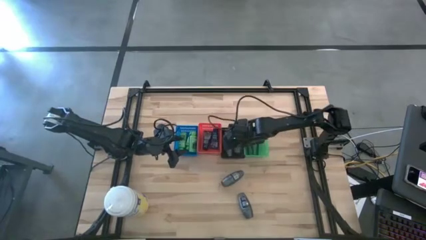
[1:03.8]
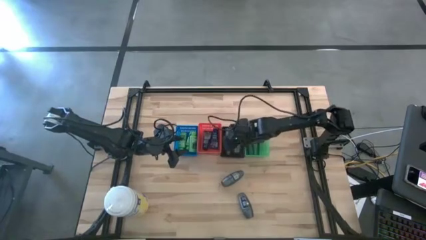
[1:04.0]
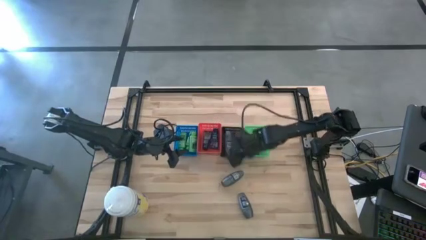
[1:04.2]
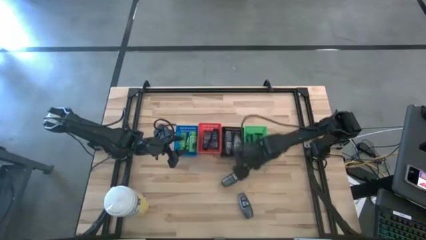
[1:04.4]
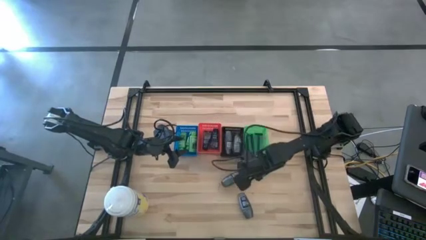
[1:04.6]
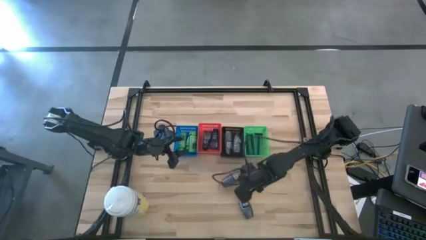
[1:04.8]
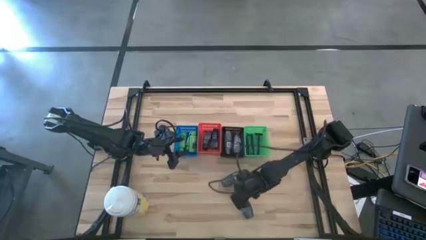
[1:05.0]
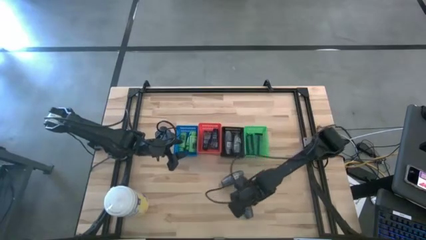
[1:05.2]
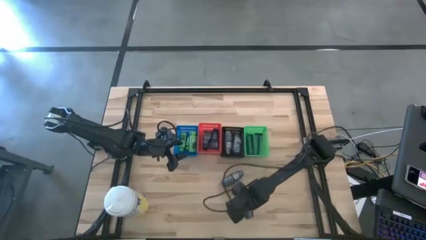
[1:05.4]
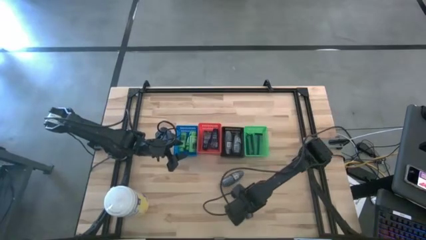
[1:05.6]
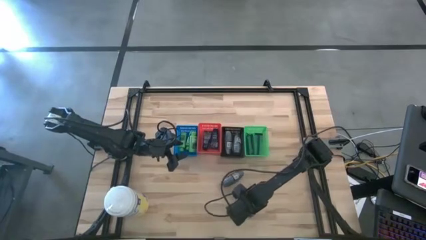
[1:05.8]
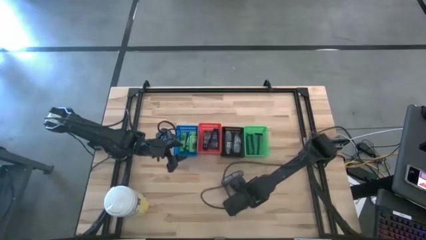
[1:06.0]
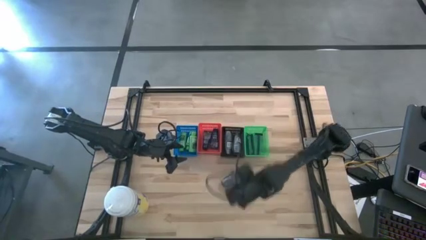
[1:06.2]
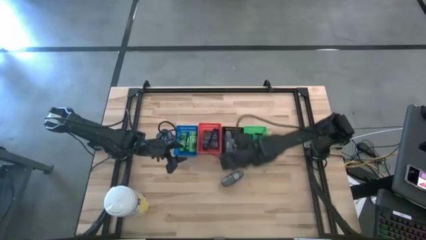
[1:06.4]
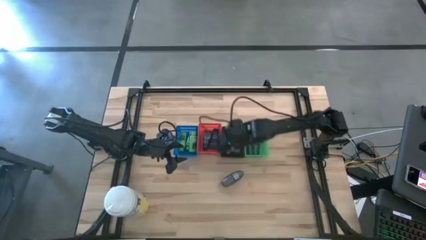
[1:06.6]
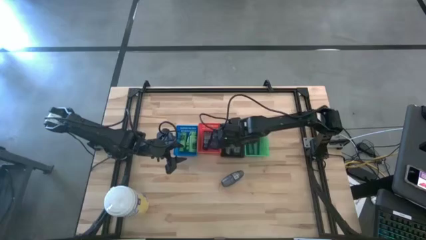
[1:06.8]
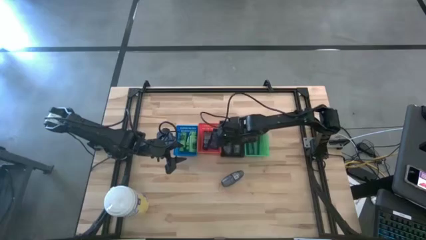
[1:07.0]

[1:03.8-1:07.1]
Task: Pick & Place Travel size toiletries
Put the deodorant into the black basket

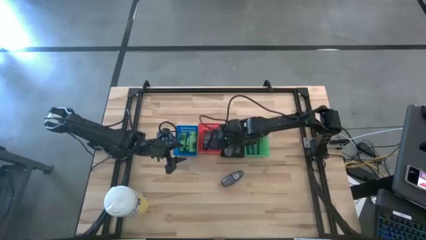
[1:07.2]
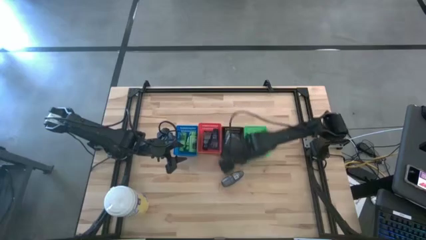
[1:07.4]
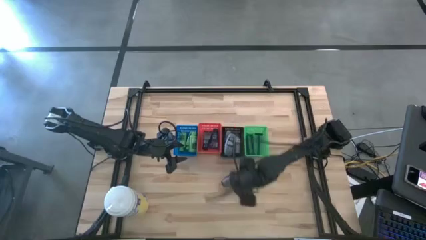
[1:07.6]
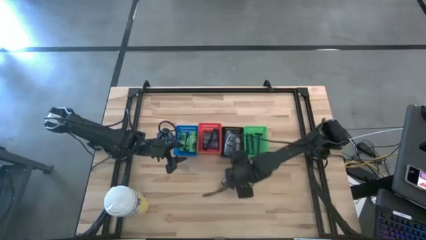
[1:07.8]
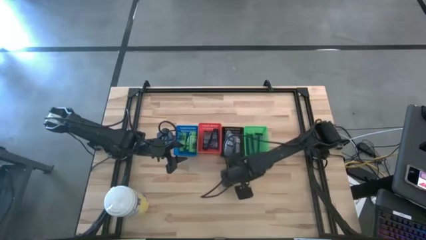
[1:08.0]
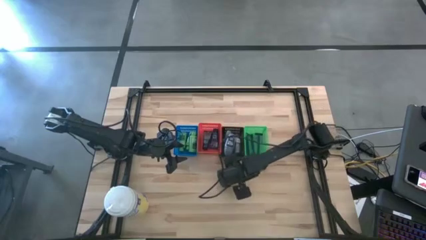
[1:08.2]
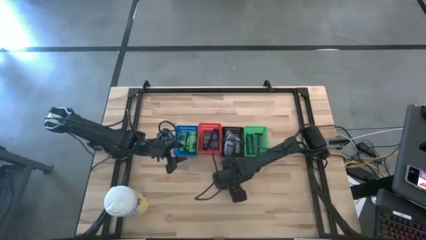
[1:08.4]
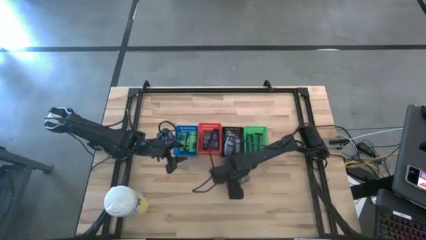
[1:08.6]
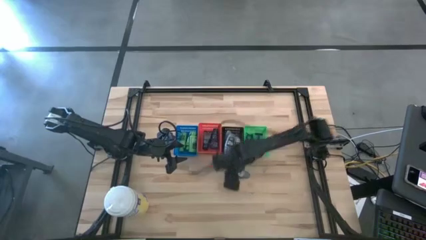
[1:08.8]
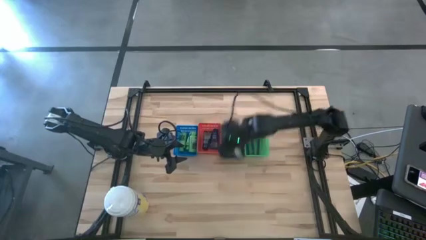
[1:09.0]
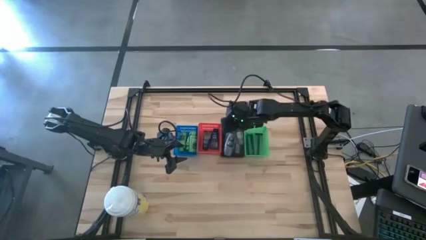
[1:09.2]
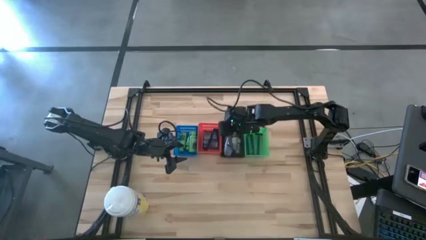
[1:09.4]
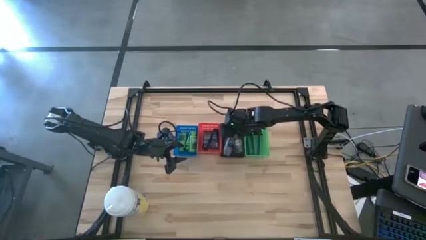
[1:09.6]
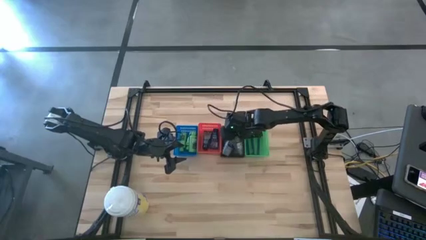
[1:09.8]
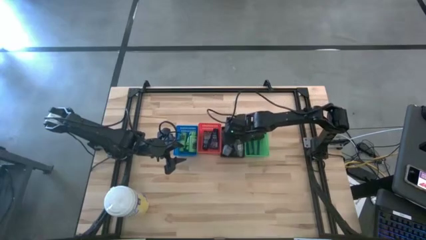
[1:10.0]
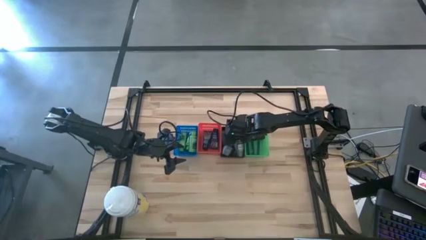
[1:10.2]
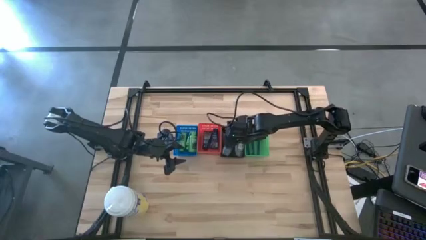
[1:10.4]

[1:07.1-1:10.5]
Put the deodorant into the black basket

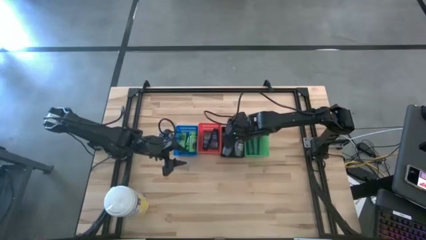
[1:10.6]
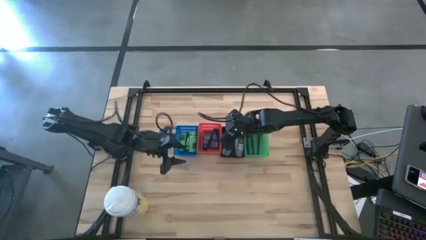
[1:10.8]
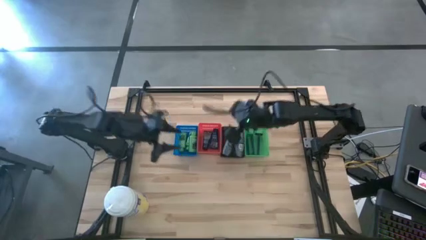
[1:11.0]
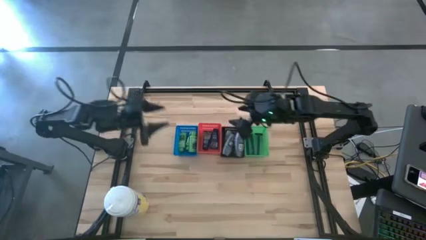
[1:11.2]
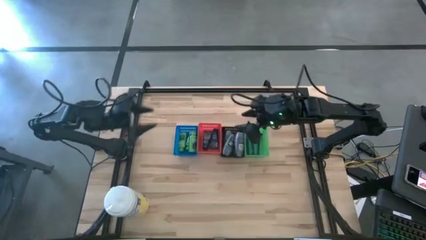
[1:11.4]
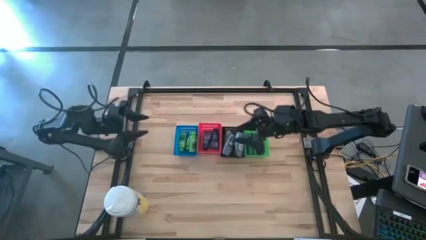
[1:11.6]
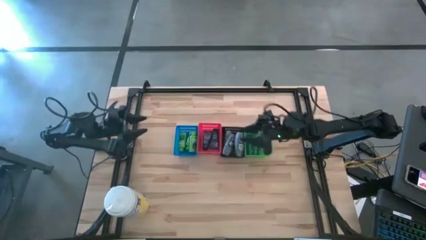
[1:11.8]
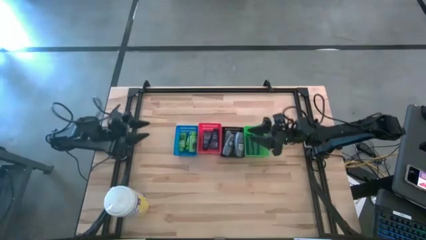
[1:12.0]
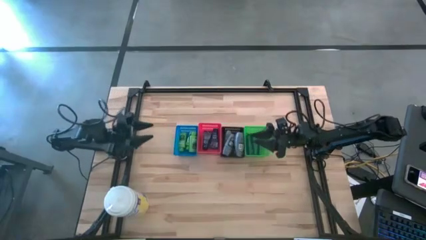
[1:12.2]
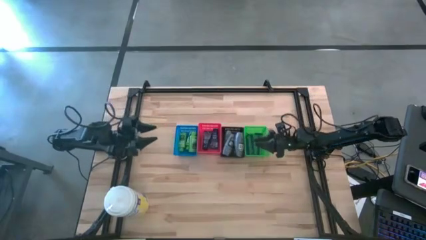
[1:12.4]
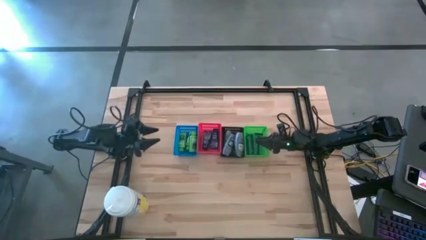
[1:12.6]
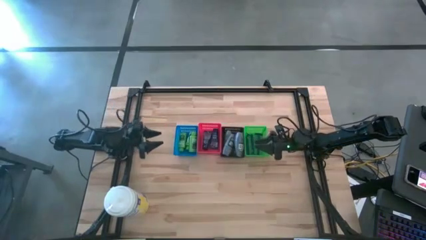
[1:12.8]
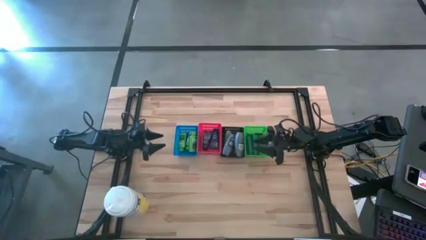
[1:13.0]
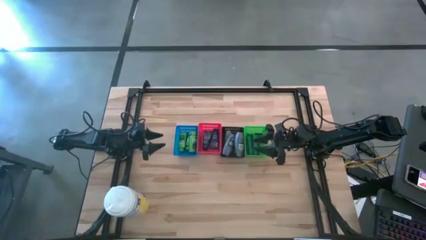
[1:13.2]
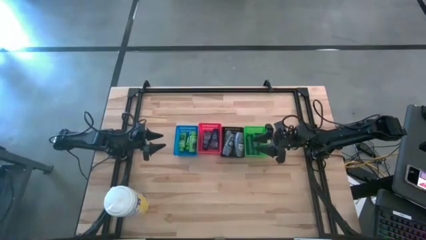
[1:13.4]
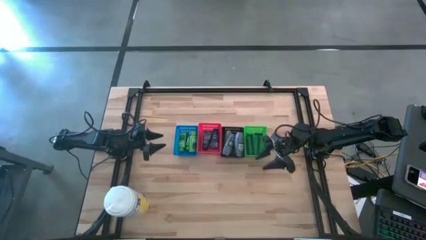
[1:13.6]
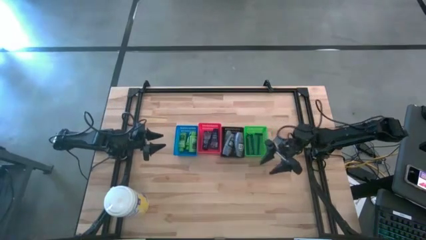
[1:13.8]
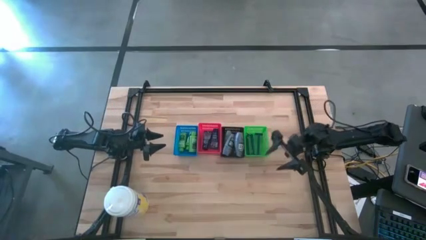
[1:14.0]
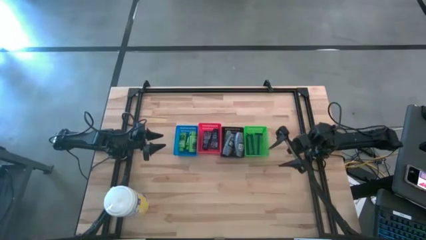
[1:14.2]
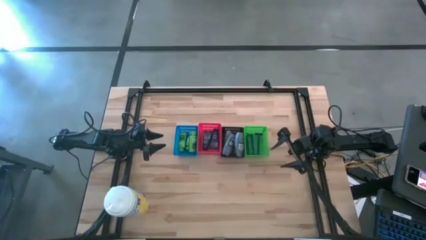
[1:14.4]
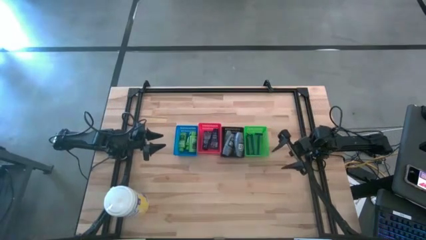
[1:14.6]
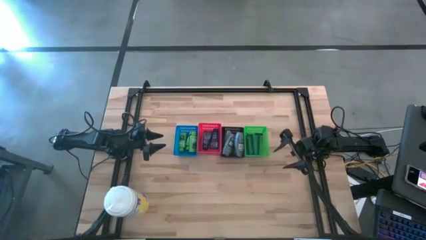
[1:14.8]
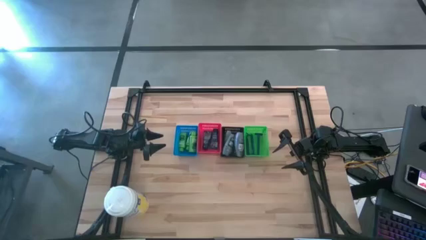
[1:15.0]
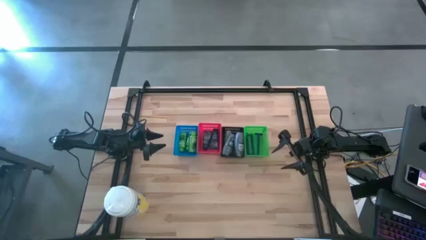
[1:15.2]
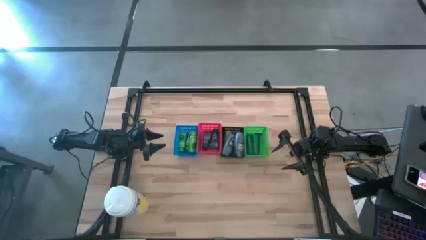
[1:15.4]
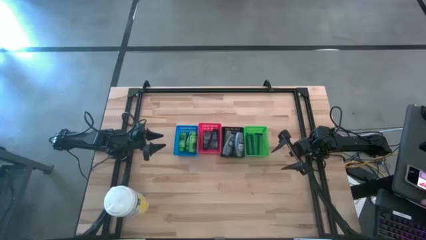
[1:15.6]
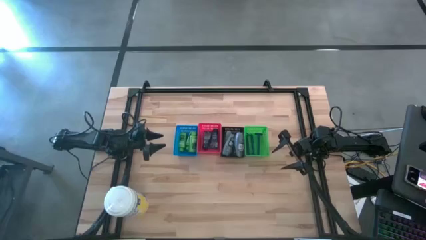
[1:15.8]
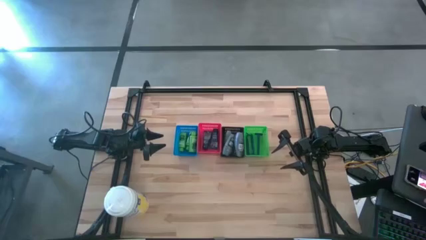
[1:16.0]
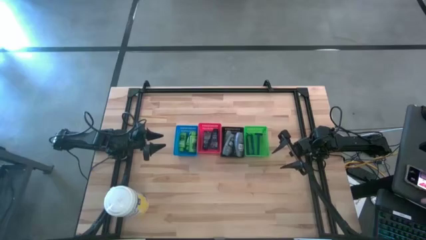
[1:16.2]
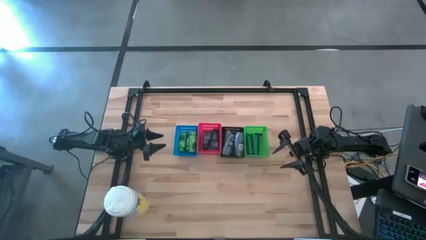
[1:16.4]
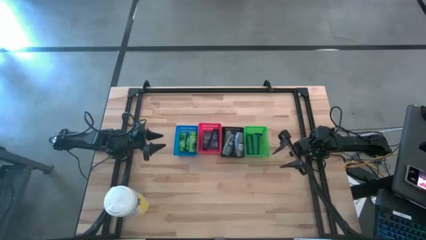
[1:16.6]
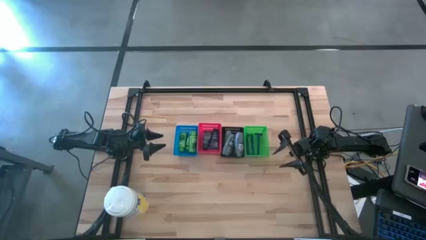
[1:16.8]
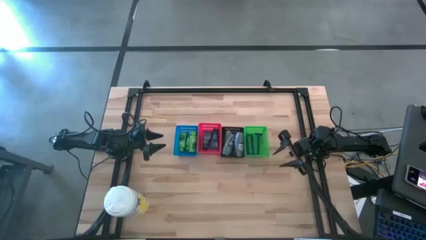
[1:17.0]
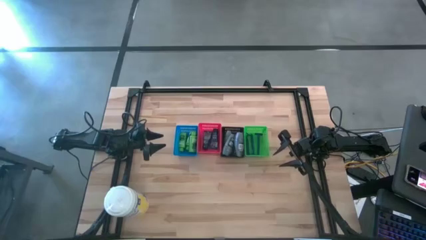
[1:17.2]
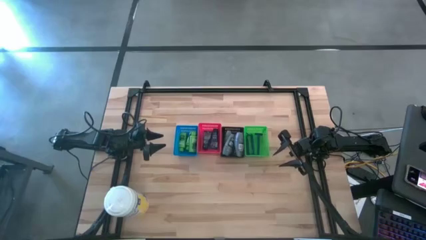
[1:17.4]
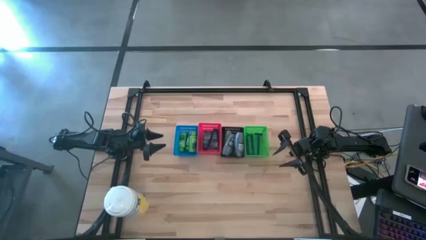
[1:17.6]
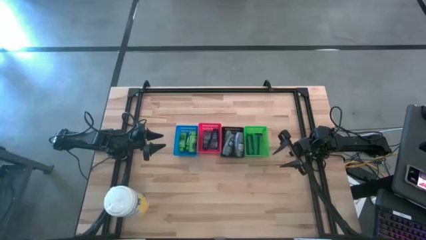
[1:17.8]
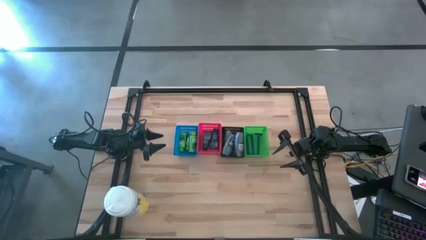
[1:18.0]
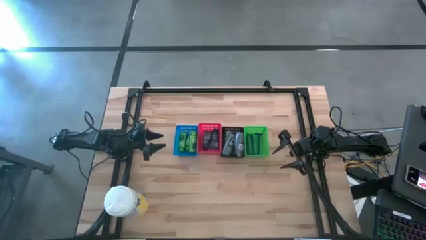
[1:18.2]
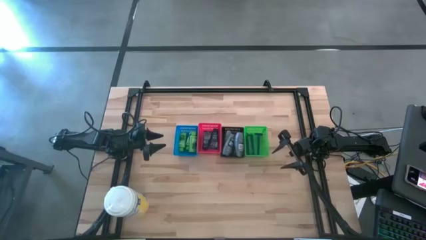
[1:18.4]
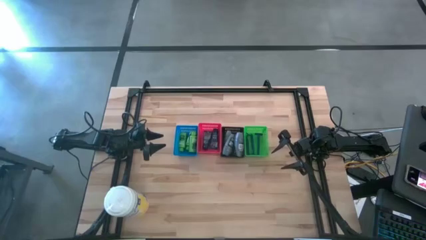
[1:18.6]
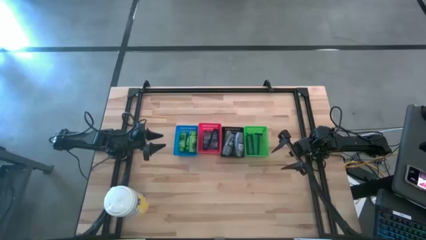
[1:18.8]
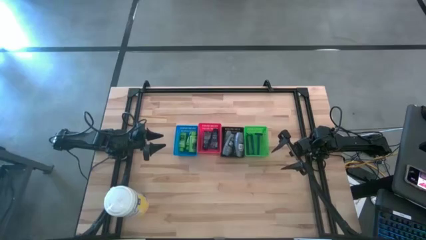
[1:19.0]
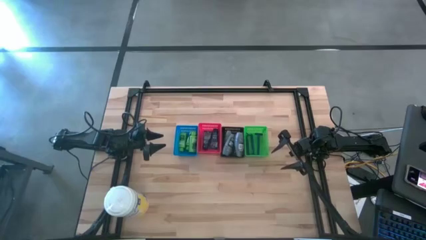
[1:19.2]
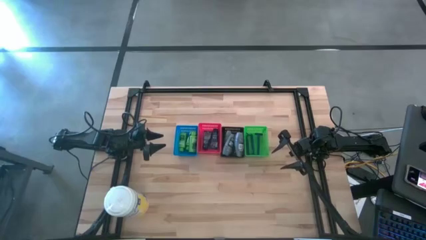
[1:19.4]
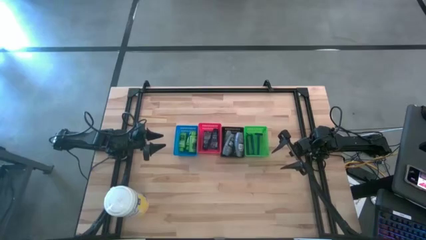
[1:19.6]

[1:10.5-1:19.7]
Return to Home Position

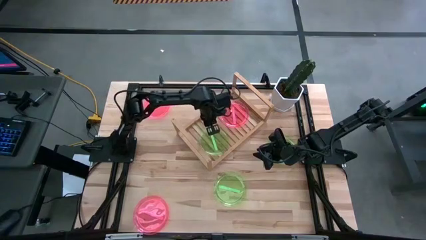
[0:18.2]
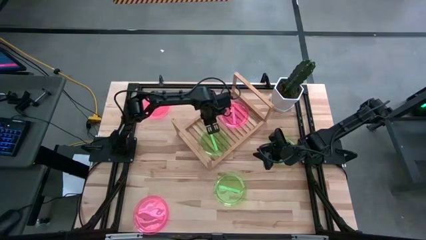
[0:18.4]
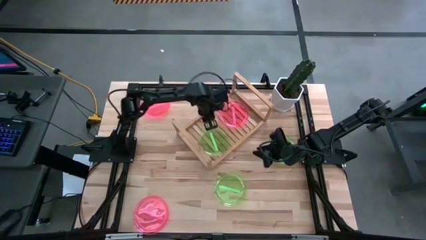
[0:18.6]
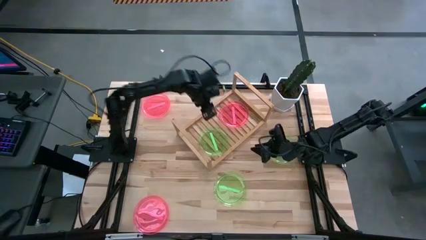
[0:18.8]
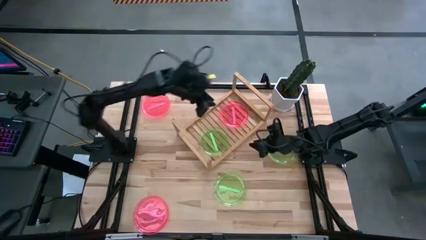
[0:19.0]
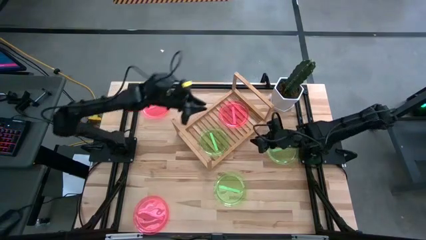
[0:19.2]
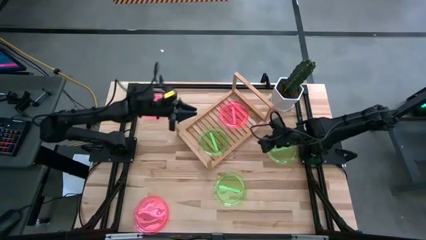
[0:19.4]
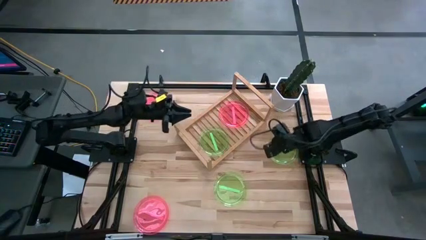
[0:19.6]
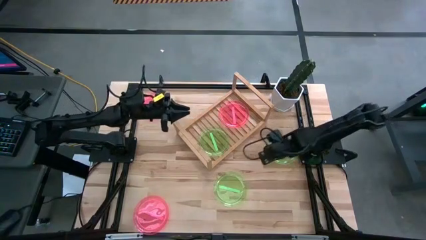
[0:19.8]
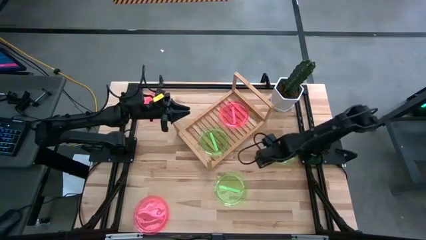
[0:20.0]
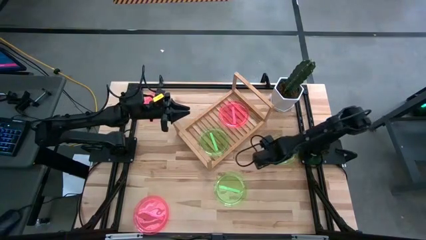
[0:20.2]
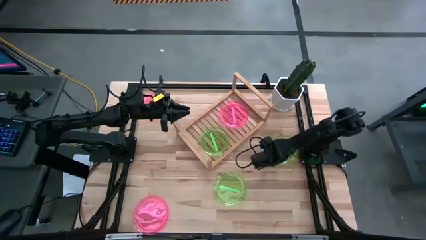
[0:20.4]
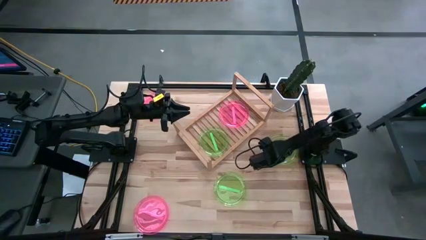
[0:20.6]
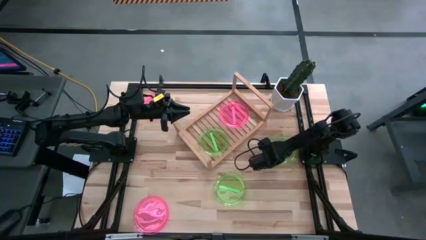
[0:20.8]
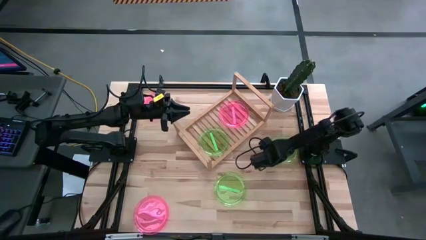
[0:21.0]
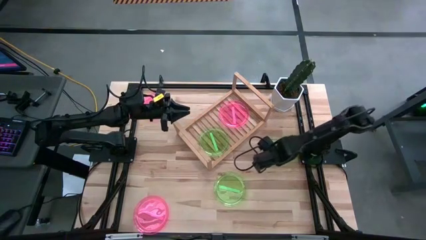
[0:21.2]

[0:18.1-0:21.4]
Task: Place and stack plates onto a shelf
Stack the top green plate on top of the other green plate on the shelf
